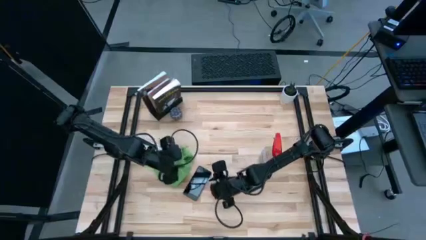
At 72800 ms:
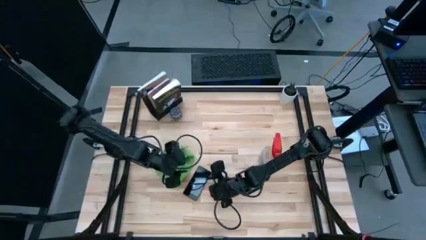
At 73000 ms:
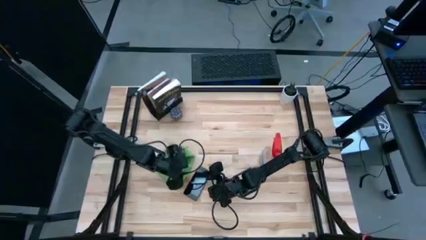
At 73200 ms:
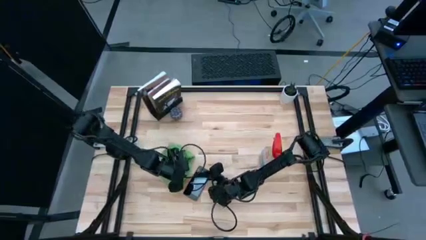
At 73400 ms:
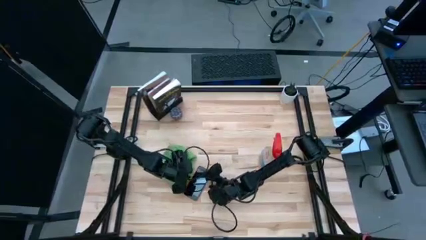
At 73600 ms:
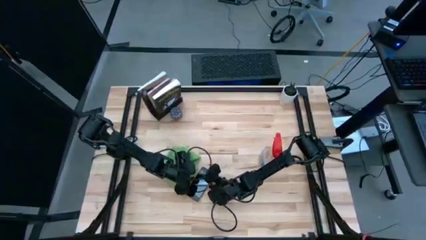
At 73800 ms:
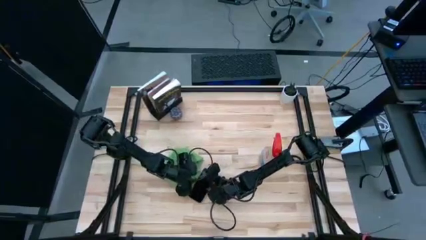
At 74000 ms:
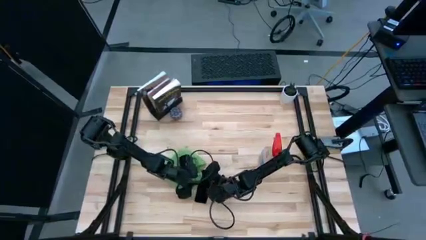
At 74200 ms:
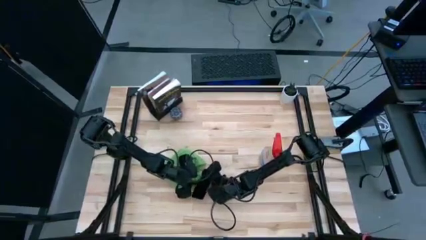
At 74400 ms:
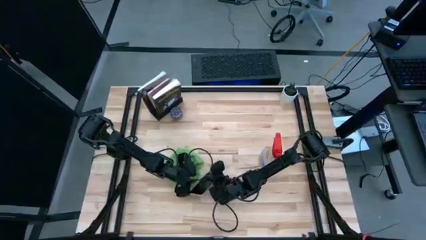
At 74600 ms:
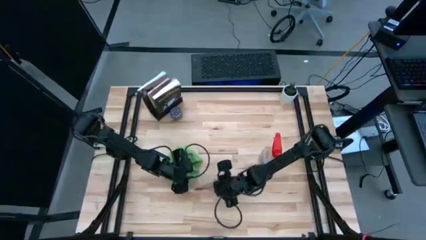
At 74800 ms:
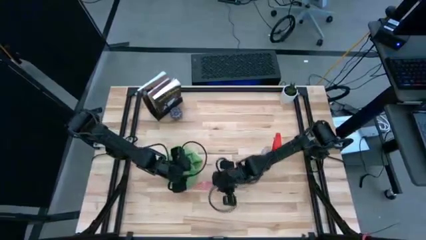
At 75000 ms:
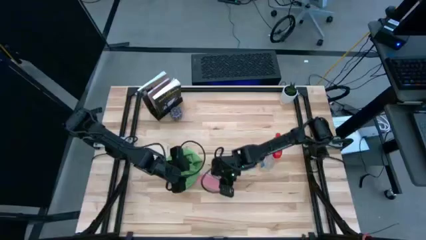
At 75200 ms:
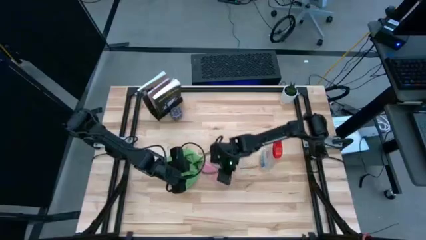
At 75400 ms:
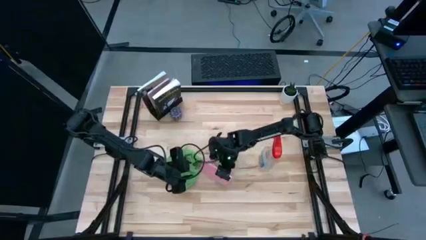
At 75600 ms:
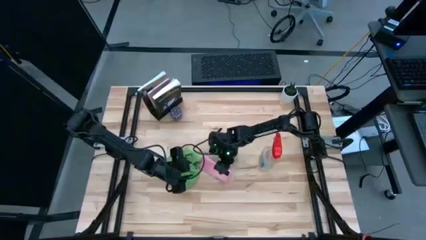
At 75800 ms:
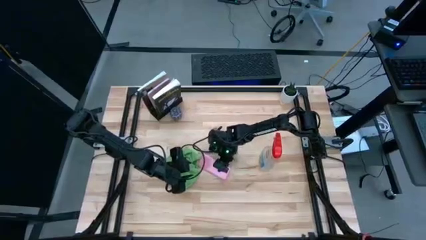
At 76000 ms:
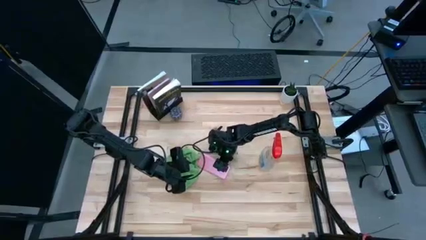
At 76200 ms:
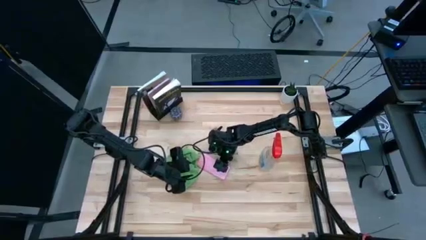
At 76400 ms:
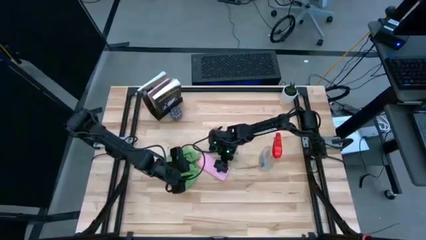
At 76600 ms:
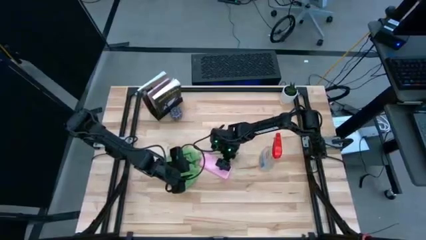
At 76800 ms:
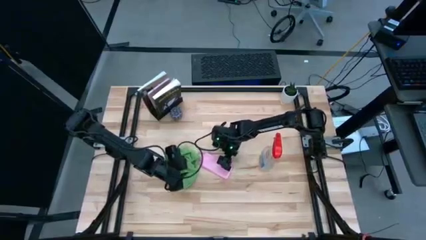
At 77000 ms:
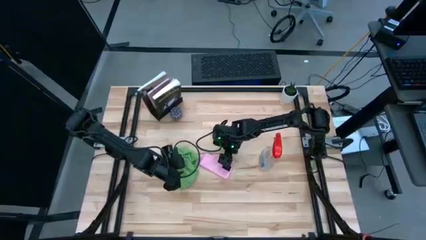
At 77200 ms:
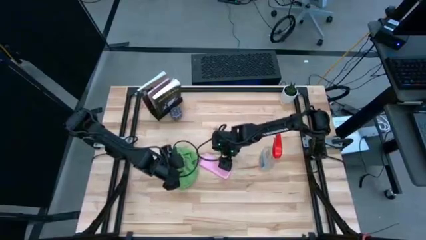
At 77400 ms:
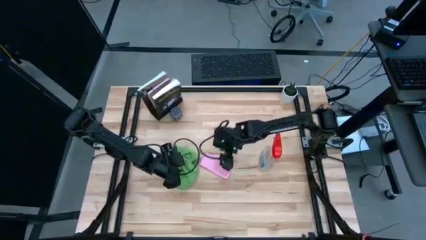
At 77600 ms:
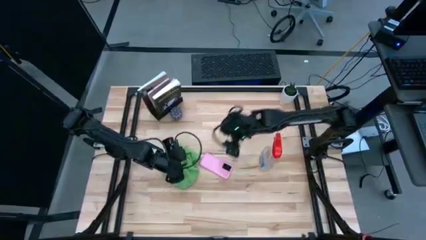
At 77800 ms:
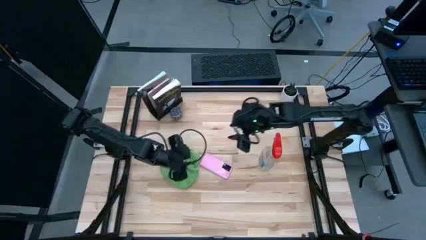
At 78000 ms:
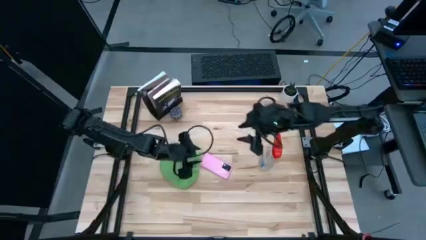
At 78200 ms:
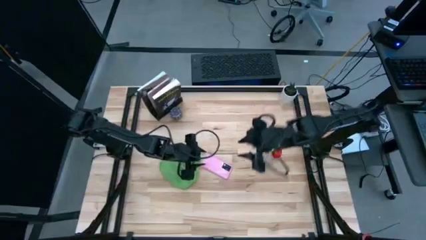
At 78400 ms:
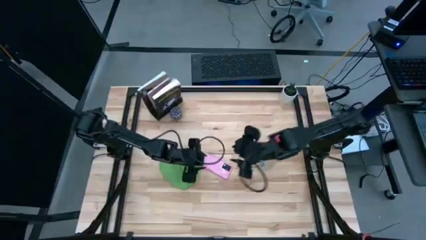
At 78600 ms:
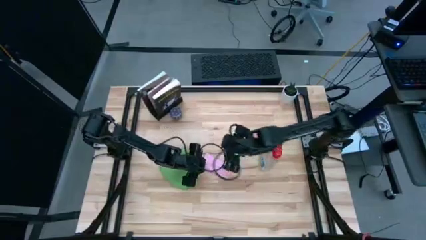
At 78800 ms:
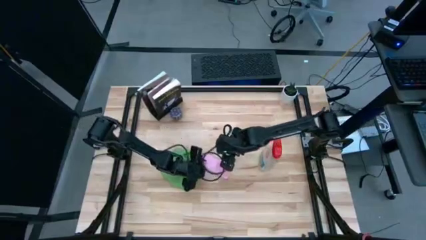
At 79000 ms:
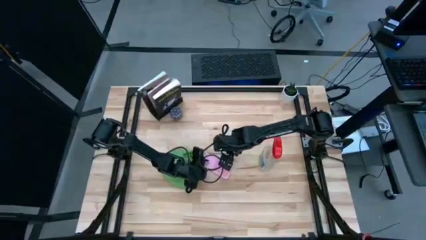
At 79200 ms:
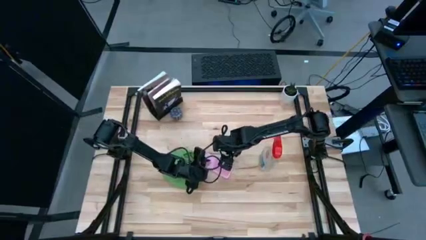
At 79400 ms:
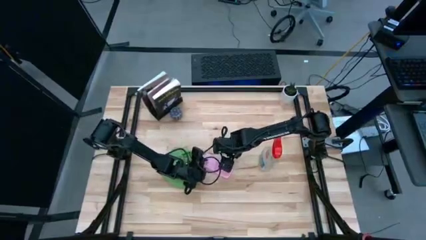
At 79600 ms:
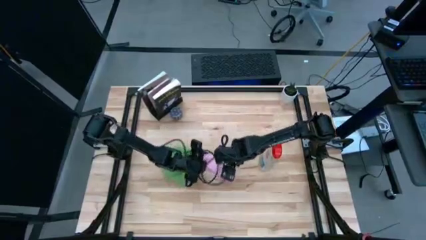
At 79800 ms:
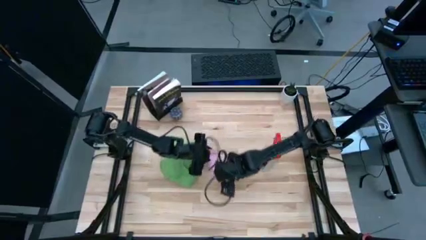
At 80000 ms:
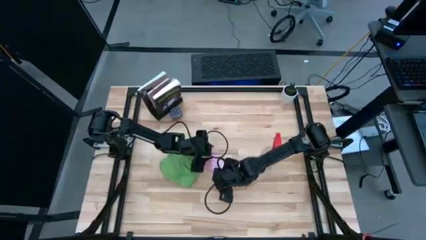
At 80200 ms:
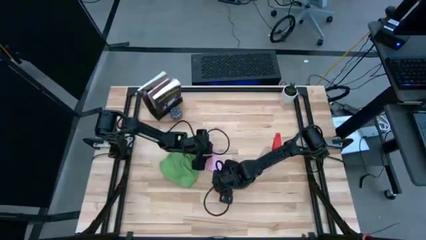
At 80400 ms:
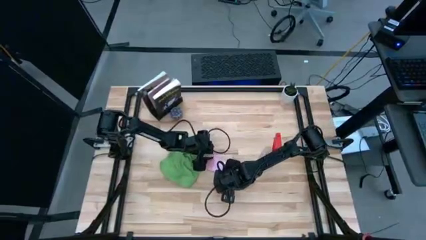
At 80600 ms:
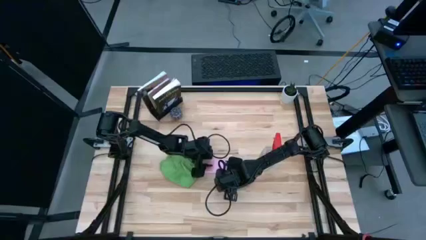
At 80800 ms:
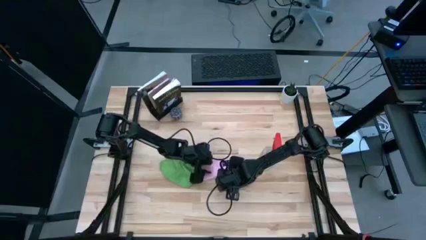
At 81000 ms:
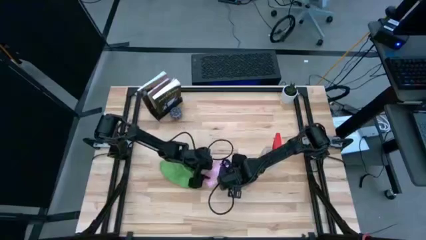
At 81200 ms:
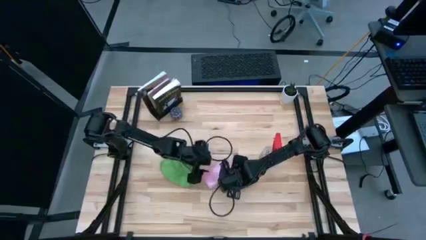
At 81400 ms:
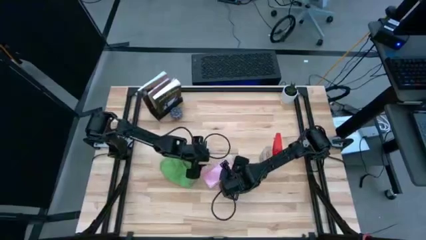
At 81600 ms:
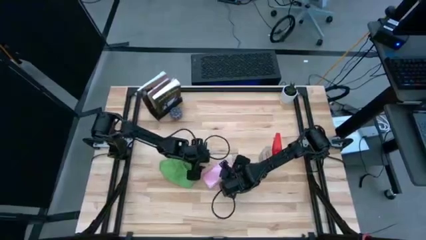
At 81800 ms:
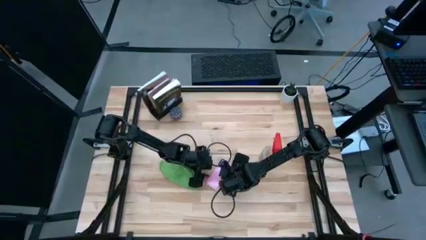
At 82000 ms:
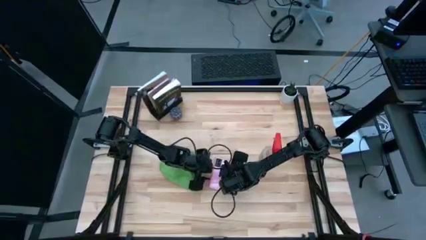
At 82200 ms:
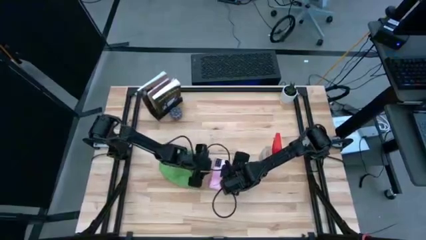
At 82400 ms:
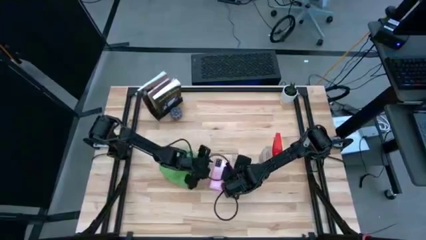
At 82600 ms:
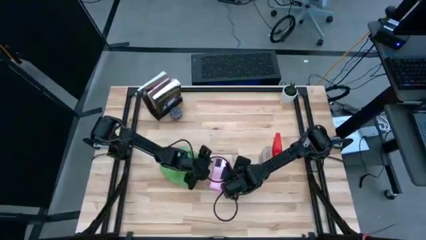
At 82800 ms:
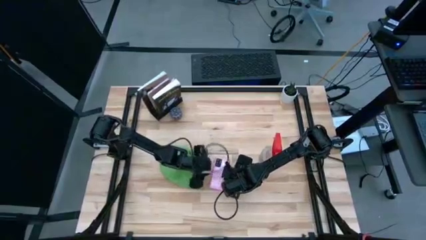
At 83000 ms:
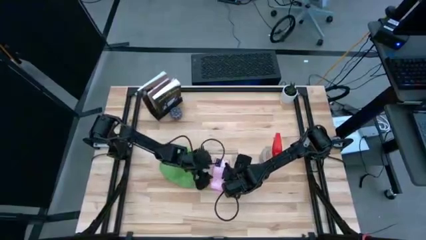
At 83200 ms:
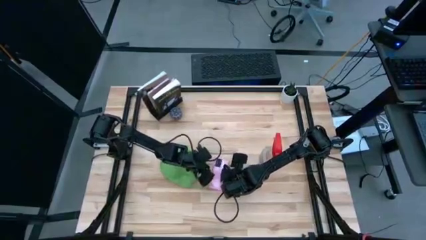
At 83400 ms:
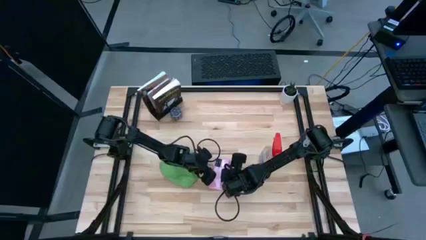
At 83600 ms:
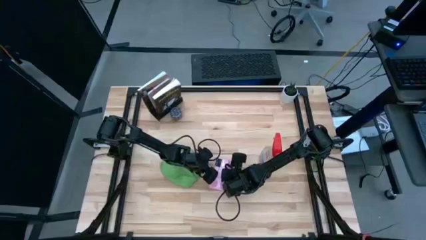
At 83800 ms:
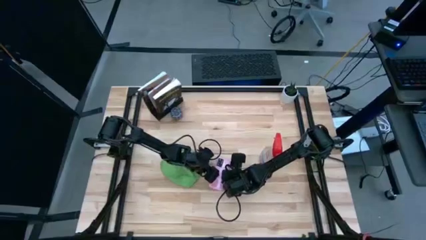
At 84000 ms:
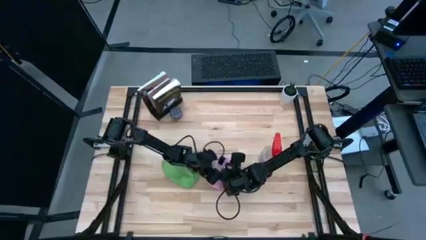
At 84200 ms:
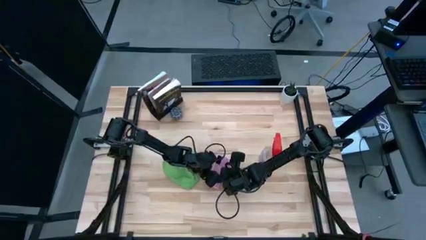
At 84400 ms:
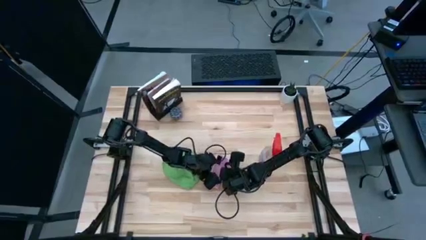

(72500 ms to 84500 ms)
Task: Apply microfiber cloth
Spray the back of the pink cellphone with the red spray bottle
